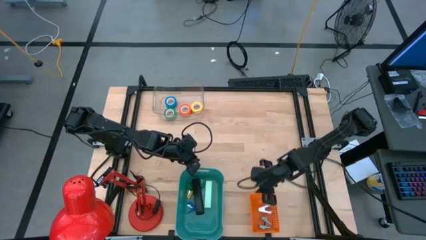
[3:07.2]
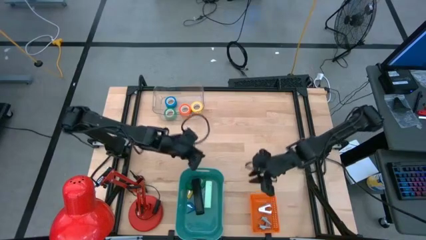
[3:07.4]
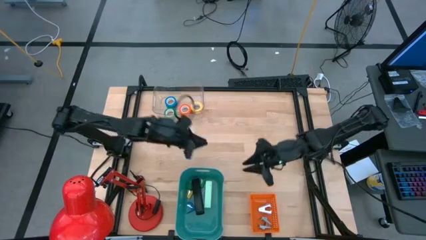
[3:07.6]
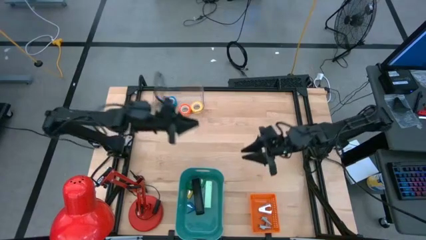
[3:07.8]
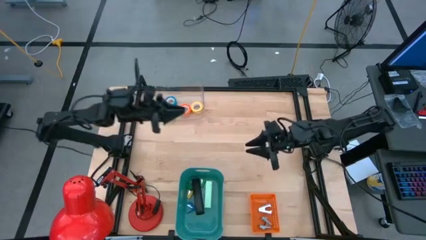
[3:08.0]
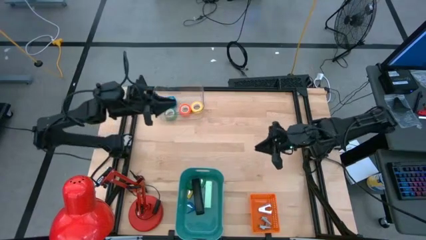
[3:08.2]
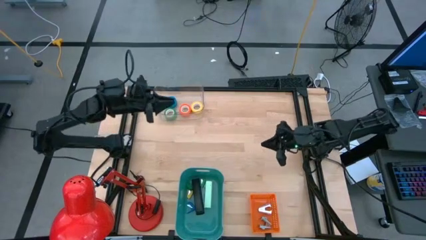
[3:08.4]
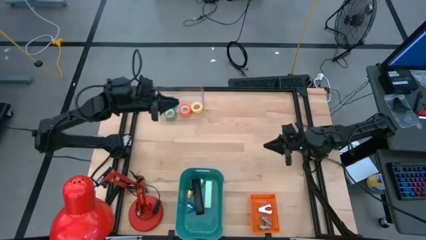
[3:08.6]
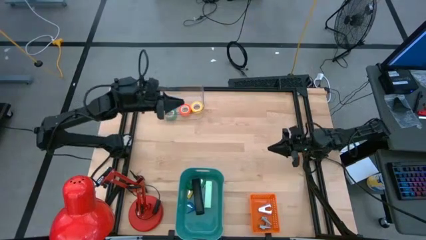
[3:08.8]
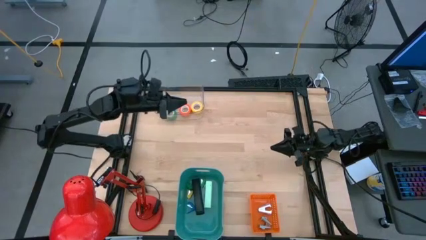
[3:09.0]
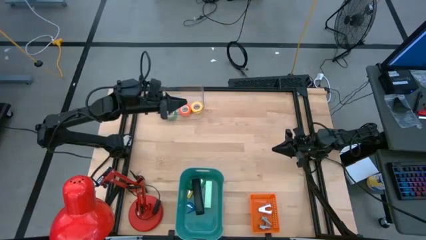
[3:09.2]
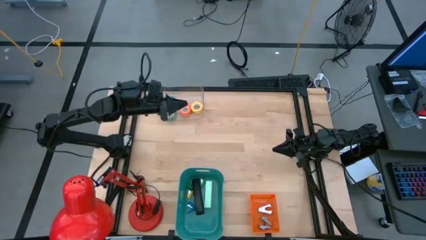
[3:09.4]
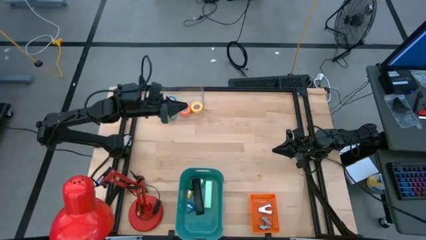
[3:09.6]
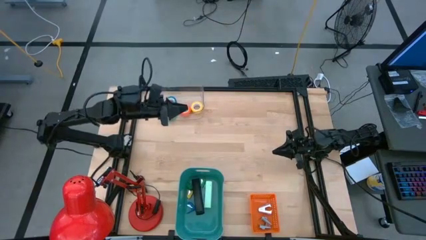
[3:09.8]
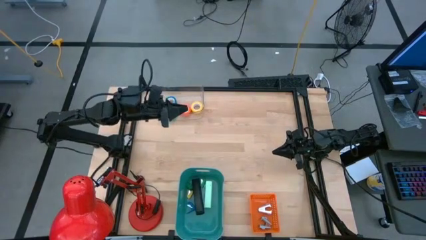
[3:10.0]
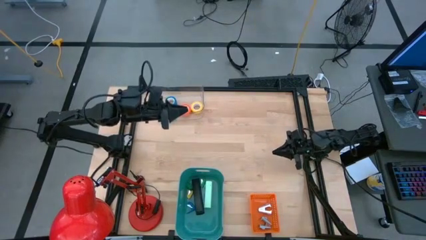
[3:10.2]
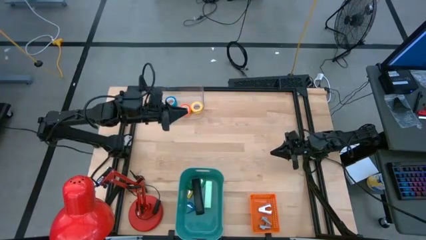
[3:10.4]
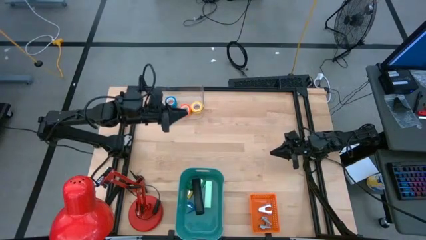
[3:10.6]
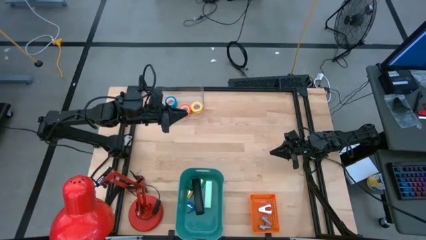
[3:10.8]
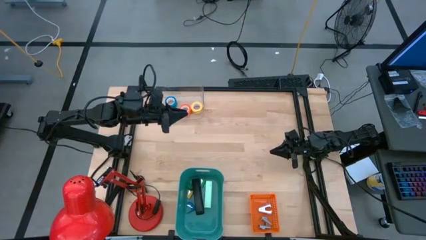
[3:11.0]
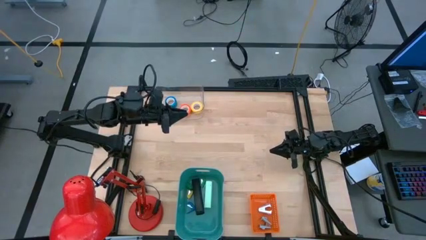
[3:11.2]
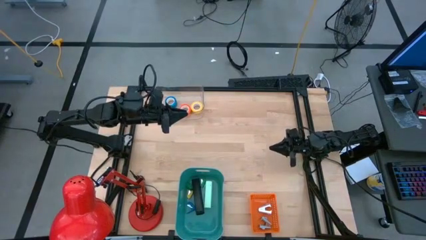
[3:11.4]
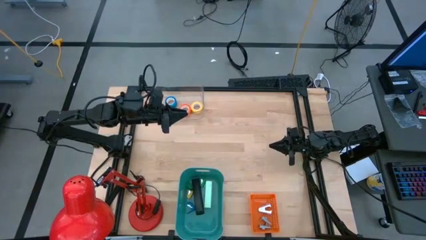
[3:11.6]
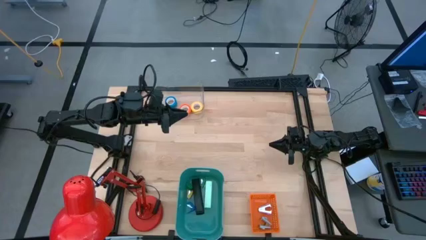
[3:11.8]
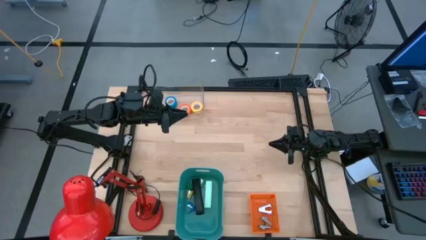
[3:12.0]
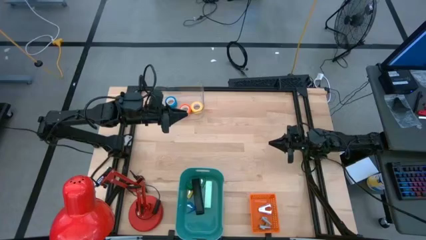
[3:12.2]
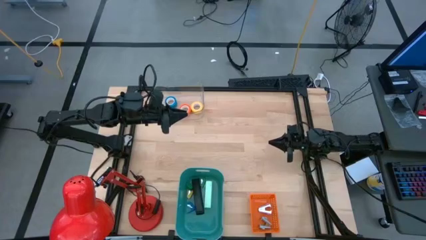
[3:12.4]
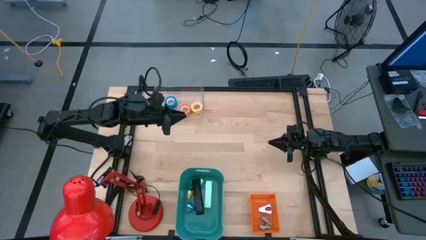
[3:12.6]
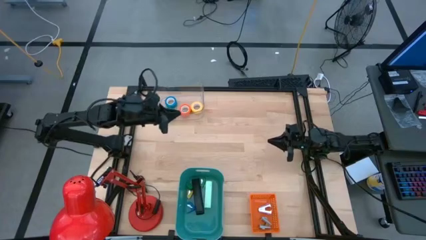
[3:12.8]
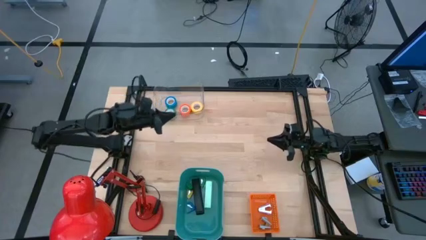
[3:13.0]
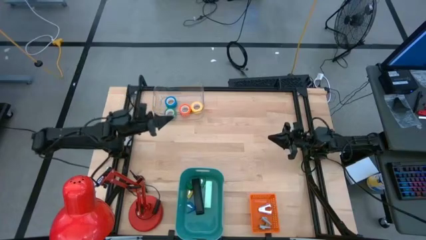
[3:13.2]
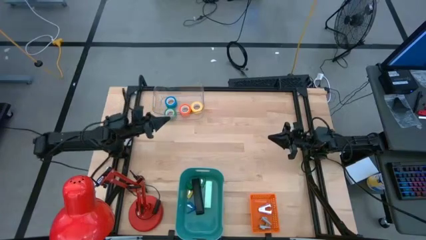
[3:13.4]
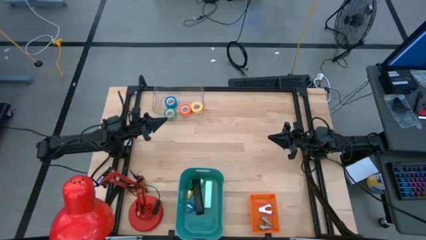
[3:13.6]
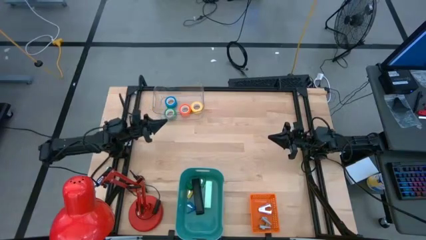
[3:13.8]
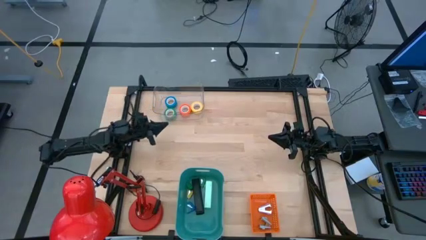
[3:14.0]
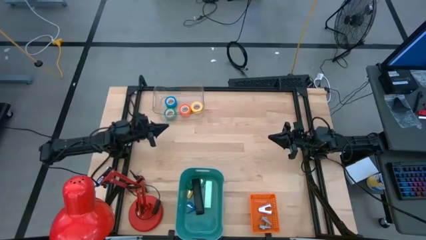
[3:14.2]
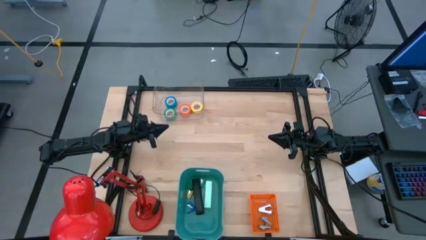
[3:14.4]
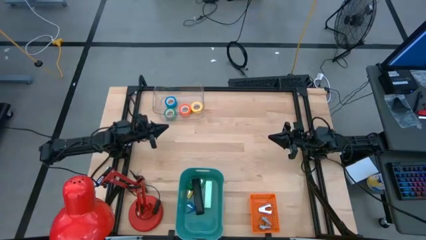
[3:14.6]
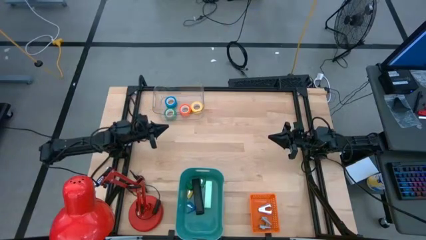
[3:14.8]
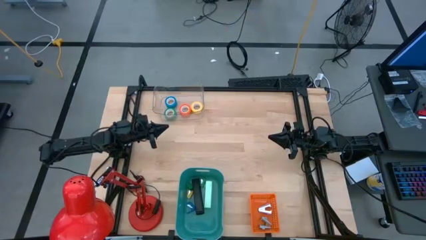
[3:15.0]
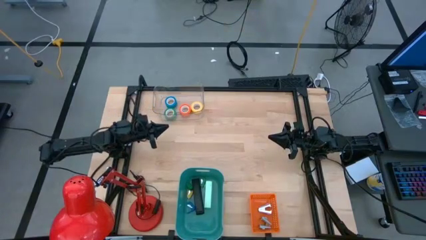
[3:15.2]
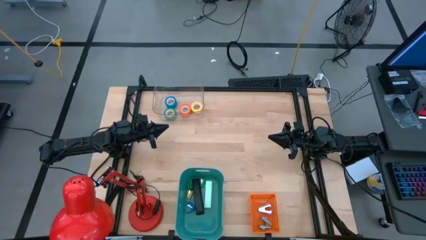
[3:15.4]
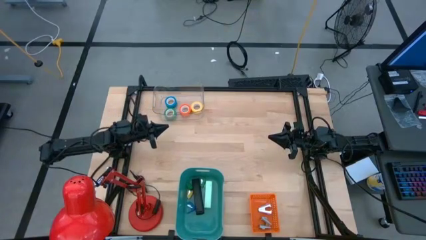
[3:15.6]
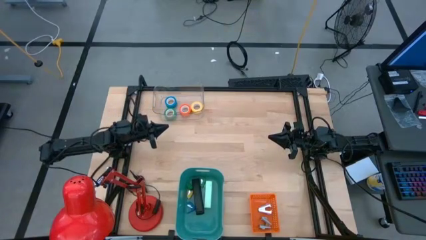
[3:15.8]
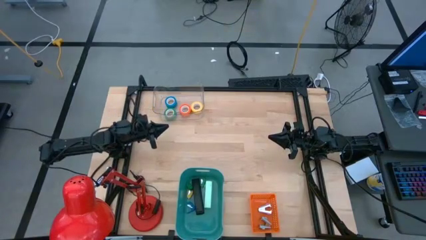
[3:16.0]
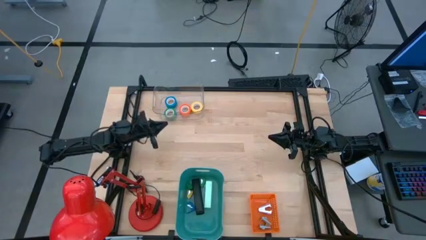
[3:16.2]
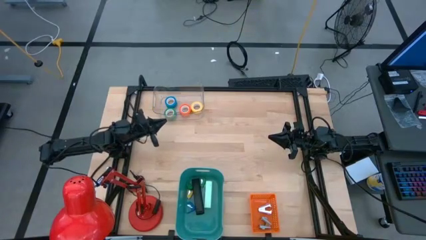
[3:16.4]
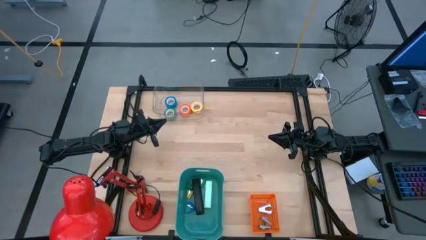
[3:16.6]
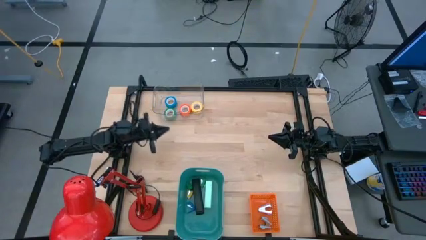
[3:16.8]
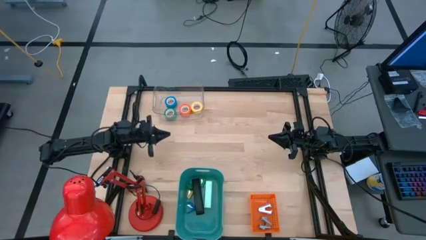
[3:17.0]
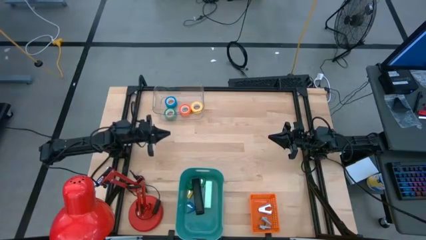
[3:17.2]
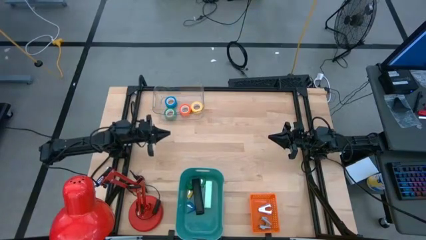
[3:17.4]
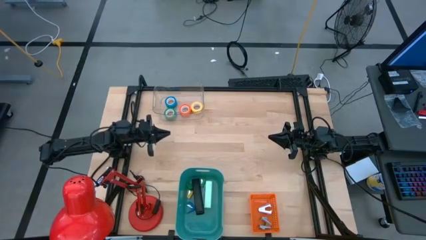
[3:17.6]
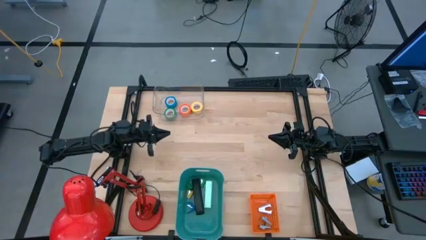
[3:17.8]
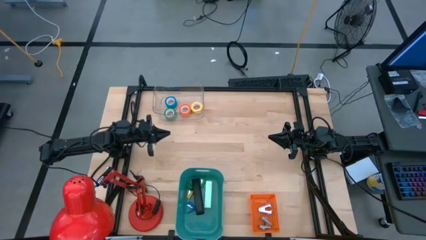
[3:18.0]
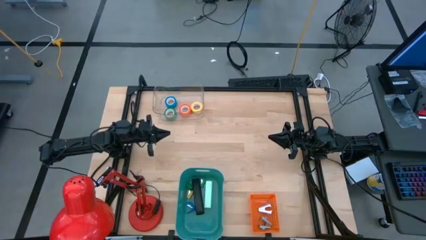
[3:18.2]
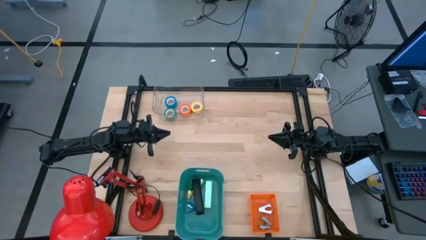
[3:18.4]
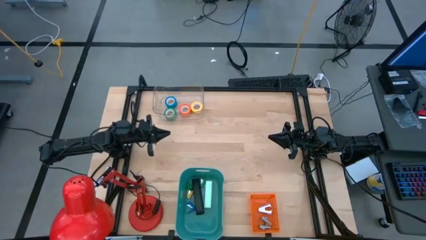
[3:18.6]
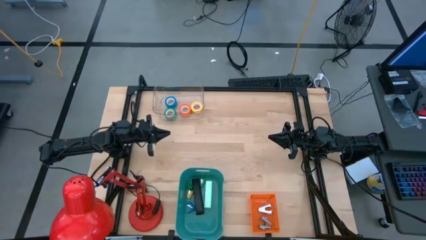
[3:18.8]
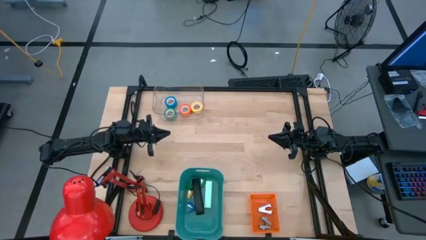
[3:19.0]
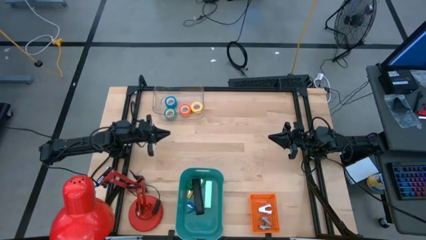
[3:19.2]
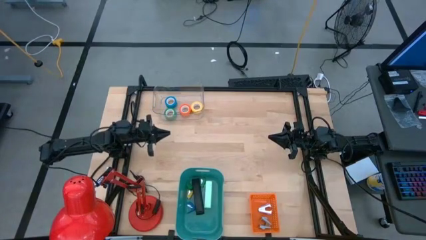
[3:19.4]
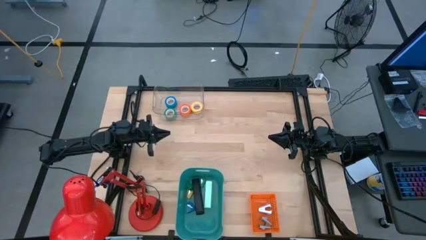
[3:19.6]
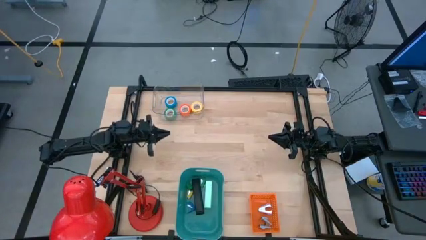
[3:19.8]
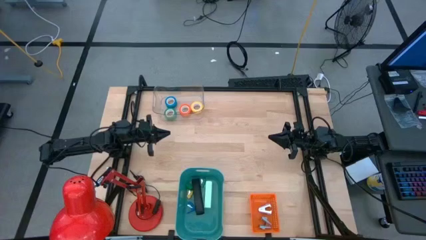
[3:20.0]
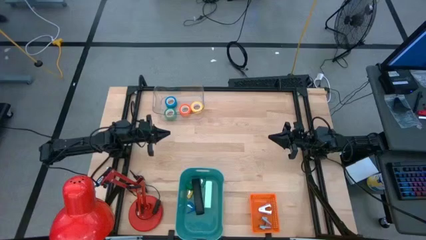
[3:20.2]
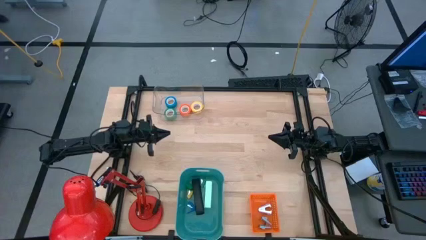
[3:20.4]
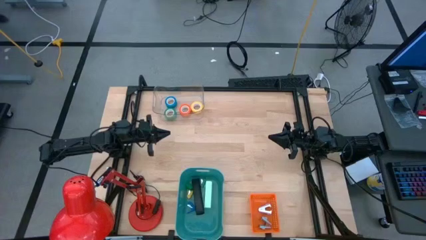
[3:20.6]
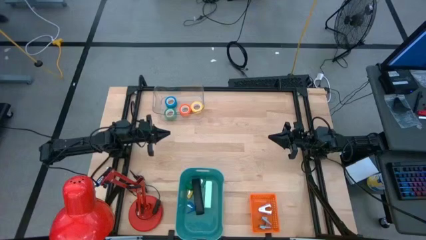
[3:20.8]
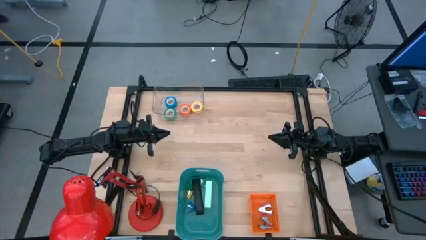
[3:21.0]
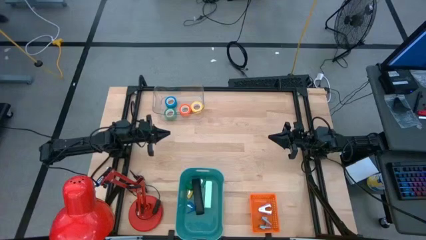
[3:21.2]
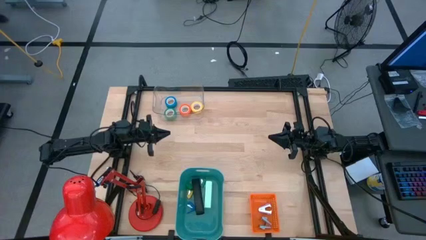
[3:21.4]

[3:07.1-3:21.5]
Task: Pick and place Stapler, Stapler remover, tape
Return to Home Position
